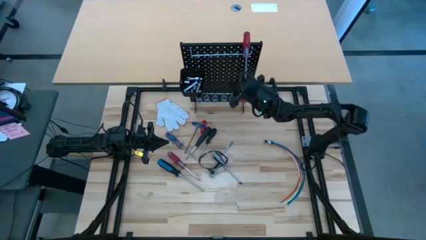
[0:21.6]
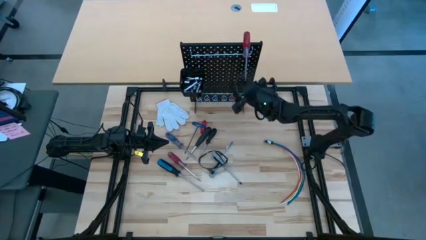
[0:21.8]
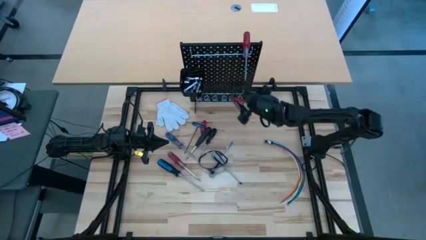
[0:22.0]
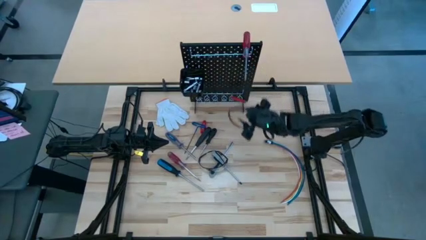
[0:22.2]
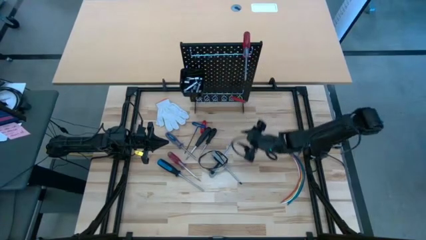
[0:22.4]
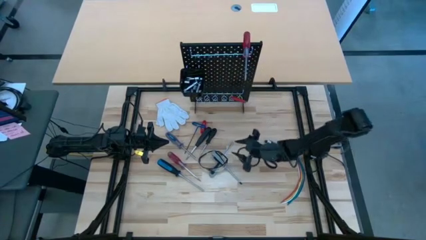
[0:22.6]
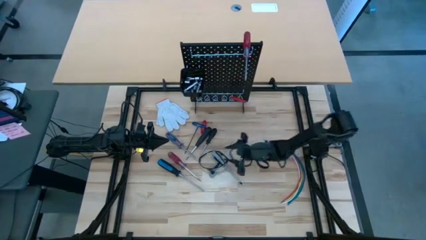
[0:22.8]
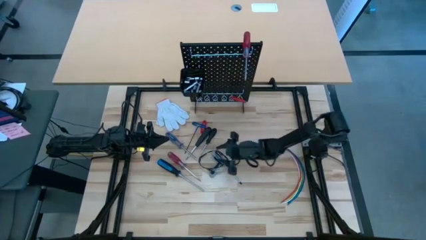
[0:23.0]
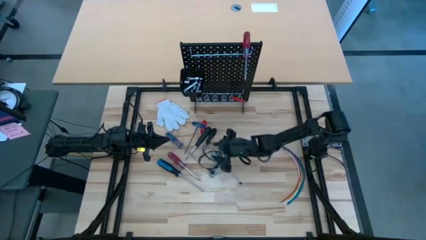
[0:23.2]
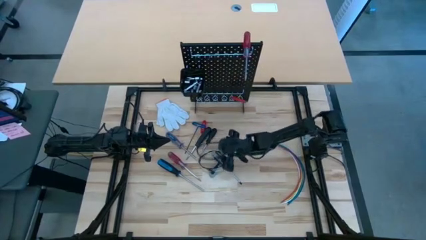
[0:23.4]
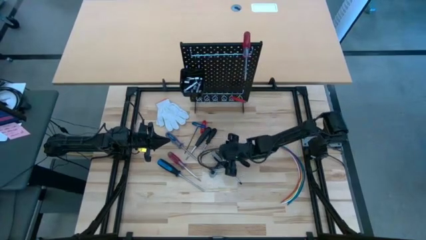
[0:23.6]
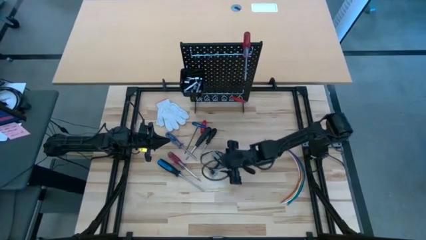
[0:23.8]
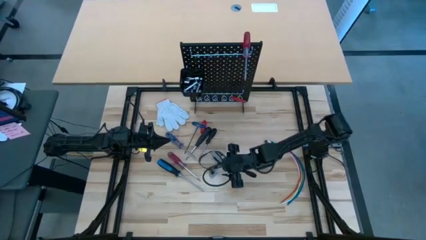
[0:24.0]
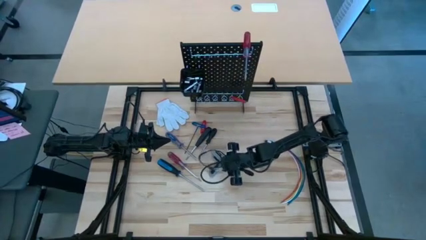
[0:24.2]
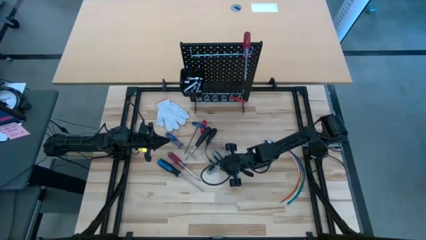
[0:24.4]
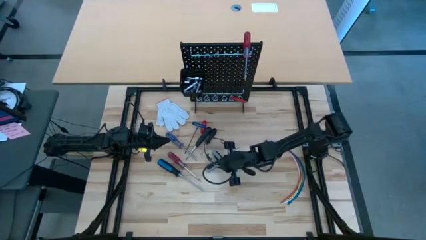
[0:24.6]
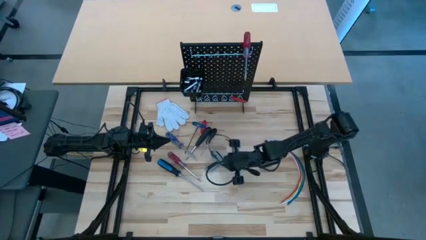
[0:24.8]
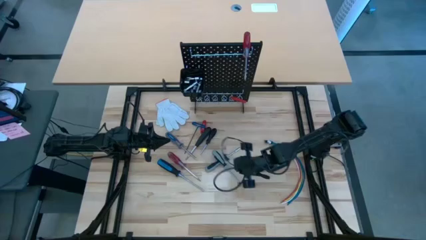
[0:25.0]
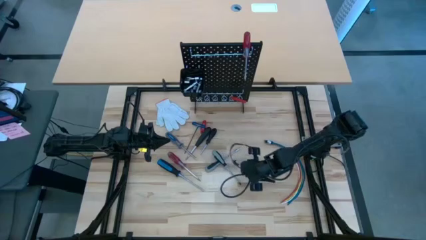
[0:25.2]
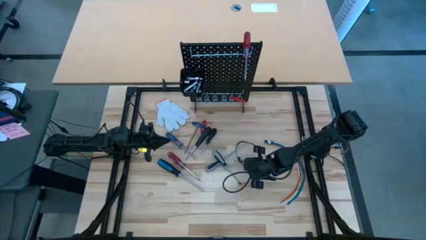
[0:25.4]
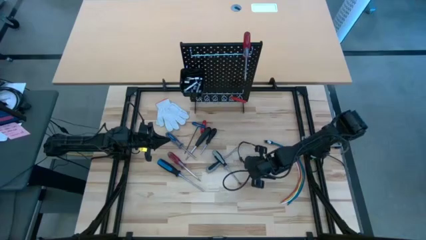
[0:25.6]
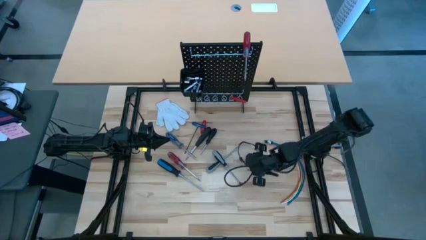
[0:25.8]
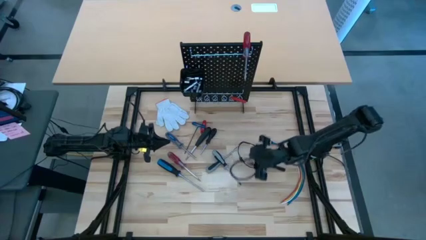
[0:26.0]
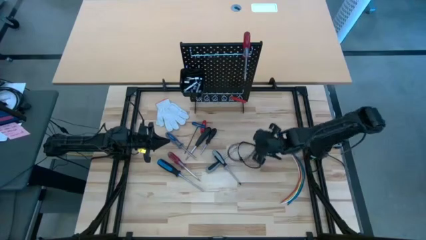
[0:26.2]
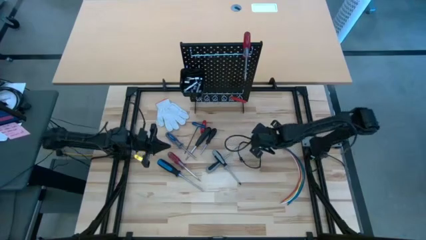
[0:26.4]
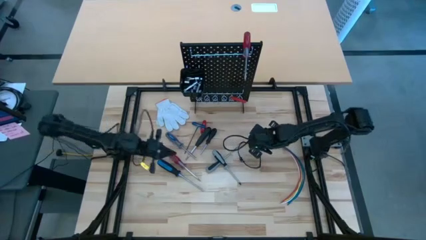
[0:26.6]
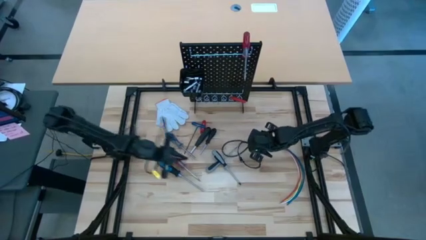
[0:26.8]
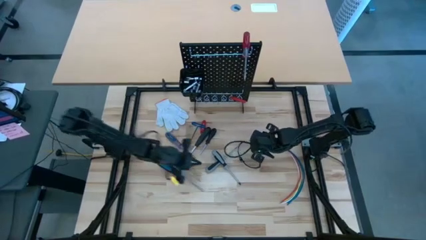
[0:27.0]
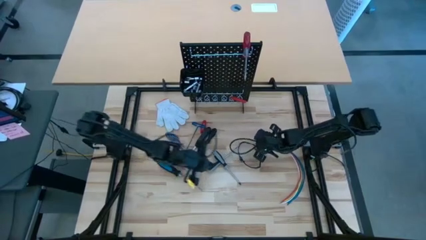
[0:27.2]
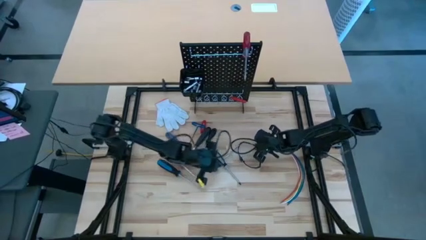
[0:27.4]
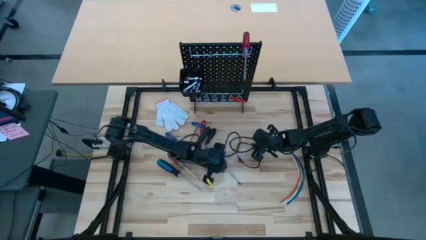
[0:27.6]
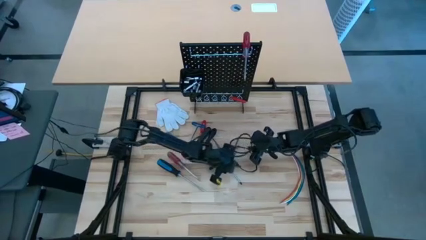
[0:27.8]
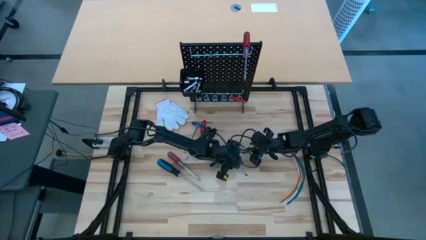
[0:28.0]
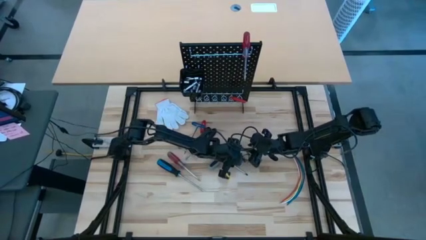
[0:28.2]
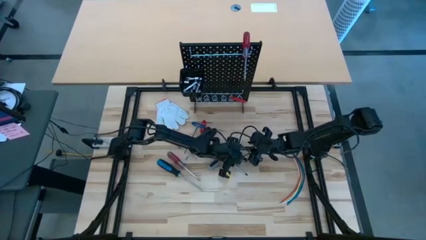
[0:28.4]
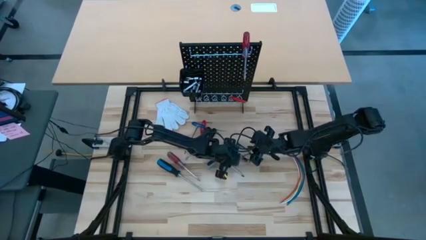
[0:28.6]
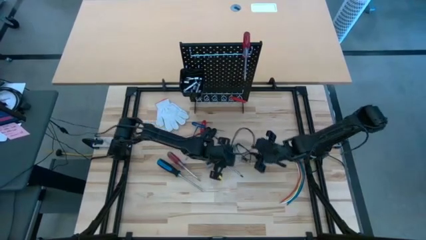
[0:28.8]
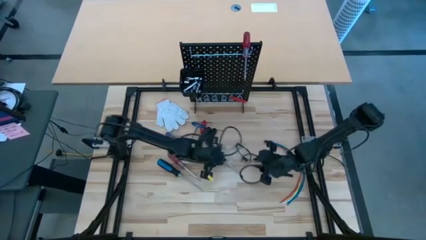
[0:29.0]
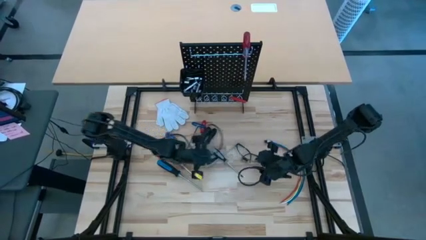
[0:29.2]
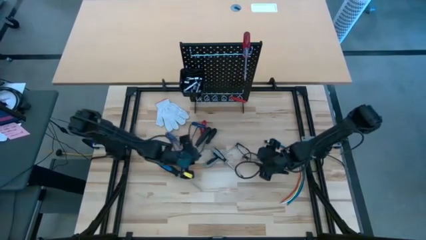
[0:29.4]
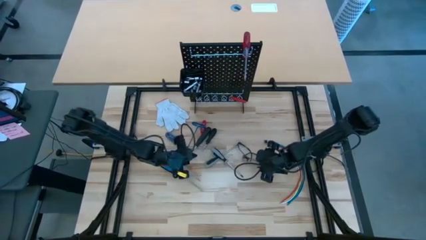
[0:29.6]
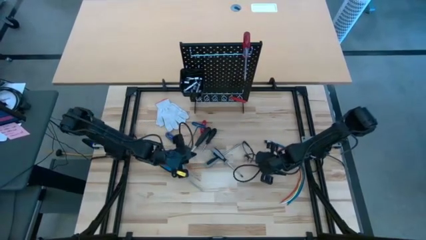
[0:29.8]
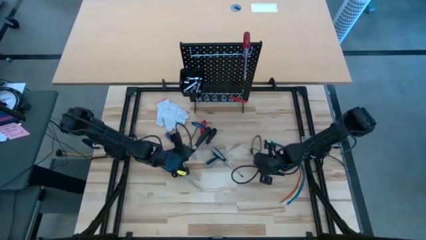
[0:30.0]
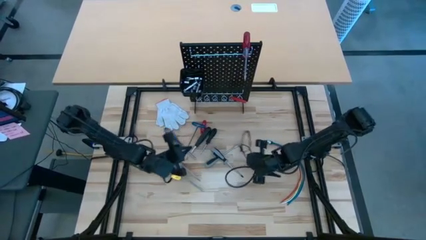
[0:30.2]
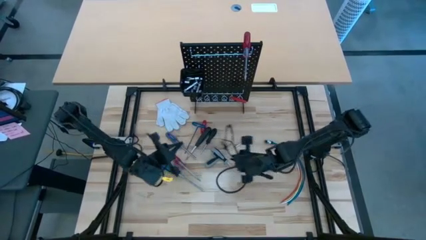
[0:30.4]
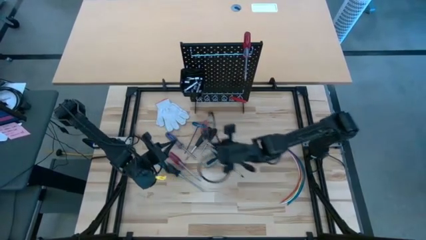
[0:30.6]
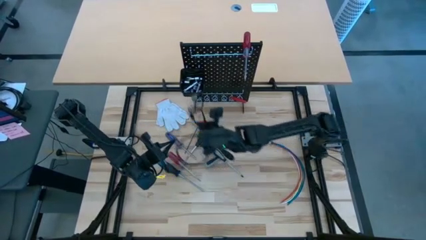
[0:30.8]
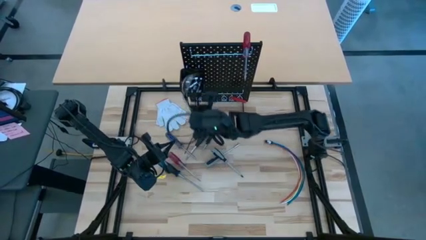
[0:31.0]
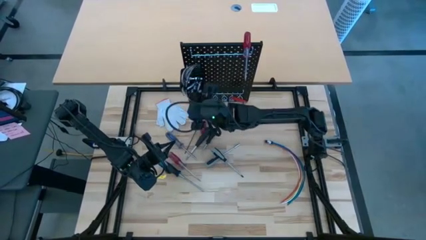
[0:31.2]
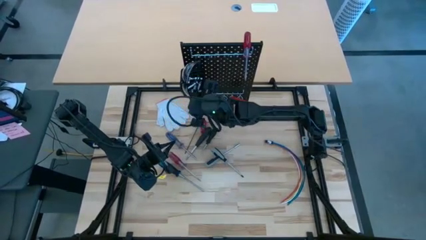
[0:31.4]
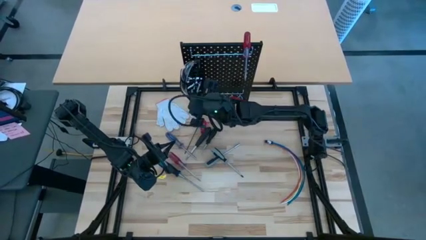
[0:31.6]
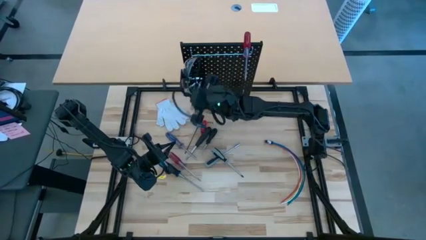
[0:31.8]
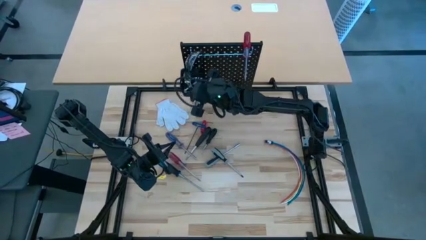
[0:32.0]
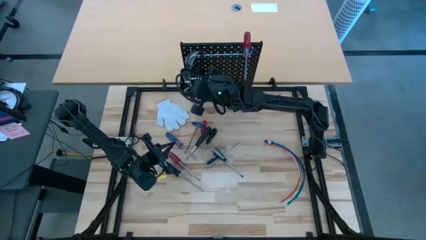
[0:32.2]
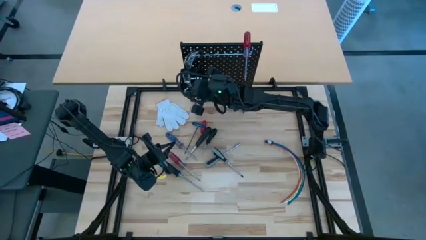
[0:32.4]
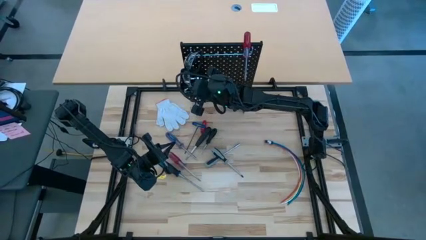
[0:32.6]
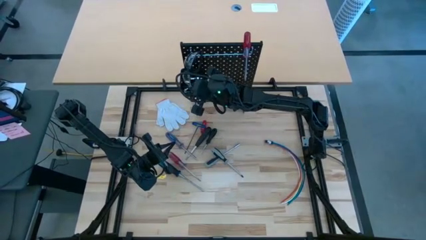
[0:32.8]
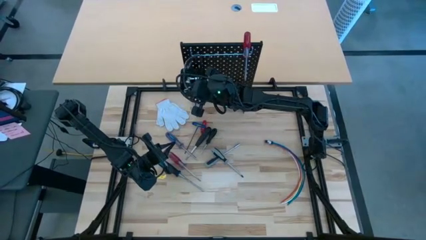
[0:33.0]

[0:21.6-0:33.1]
Task: Hang tools onto peg board
Hang the safety glasses on the peg board

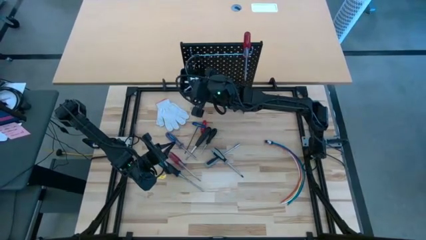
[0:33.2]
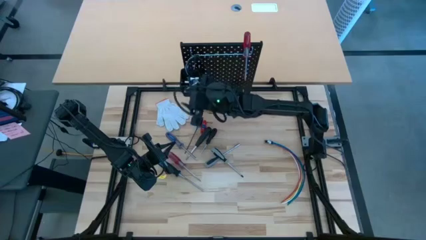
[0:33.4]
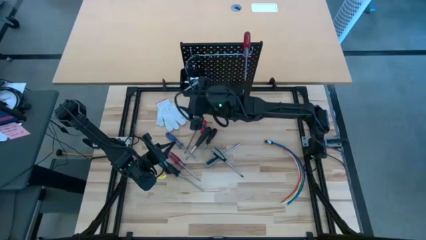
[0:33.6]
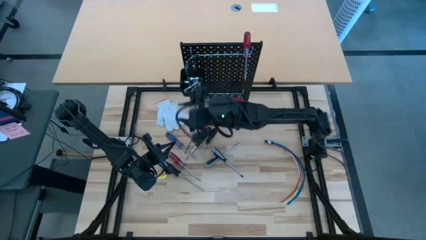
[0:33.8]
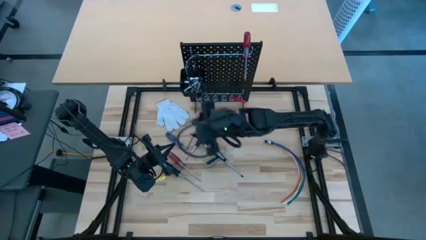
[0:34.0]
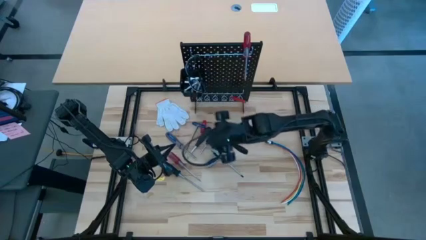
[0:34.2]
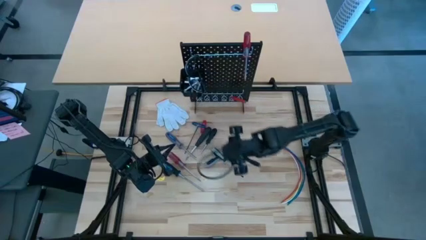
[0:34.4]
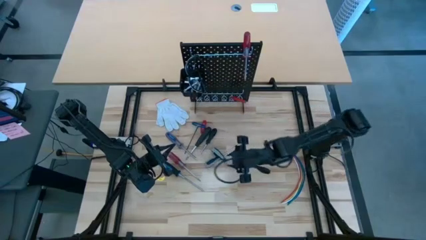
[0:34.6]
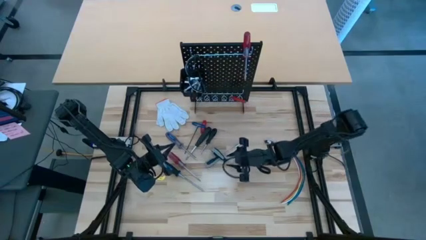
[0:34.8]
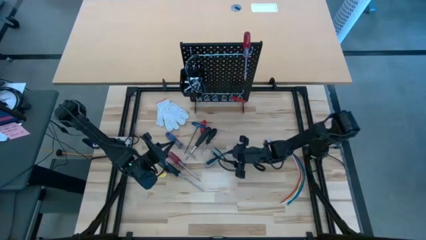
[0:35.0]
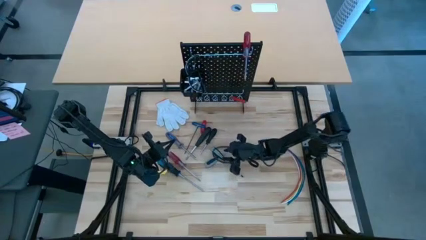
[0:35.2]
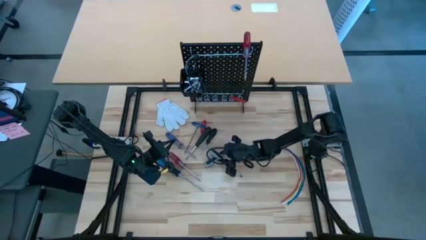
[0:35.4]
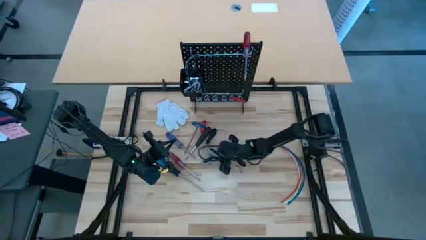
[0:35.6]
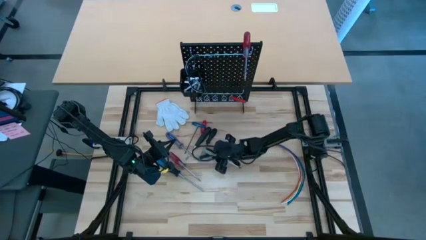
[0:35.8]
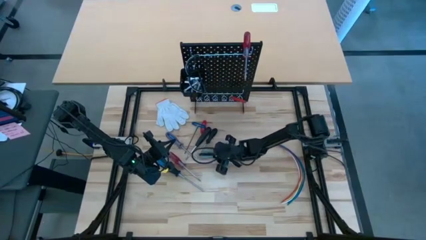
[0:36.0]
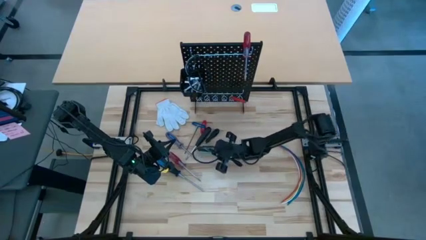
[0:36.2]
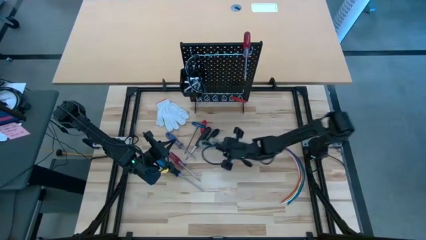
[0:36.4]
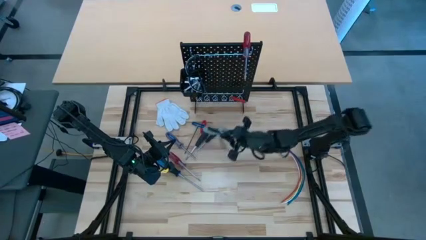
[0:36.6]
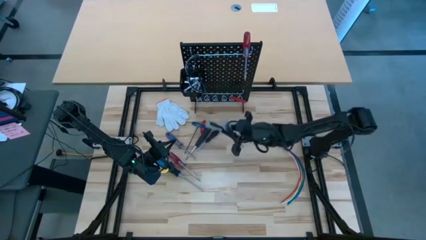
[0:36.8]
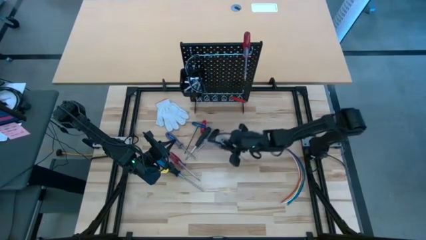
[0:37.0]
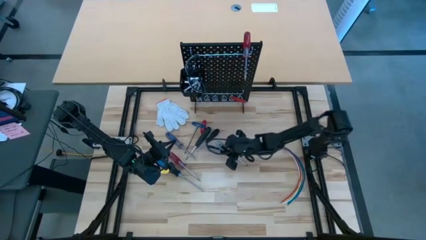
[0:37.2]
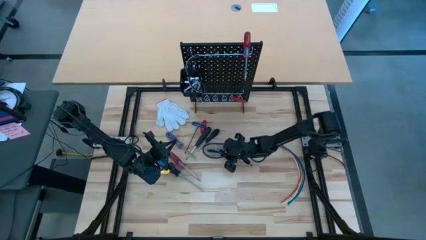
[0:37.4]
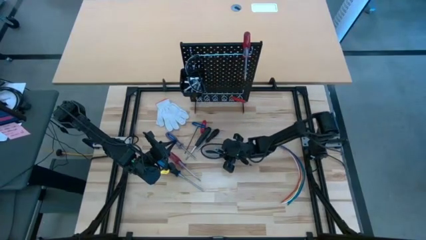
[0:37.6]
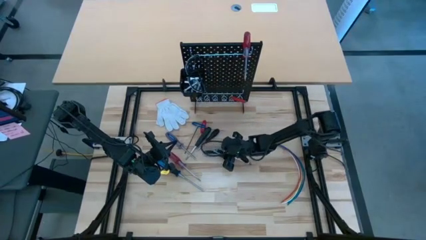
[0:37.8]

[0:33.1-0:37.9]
Hang the right grey screwdriver on the peg board
